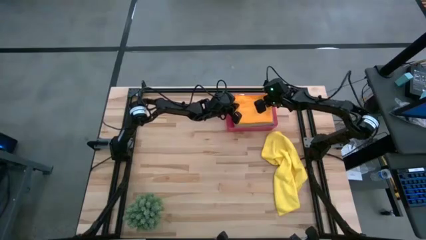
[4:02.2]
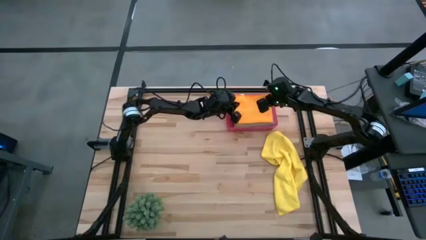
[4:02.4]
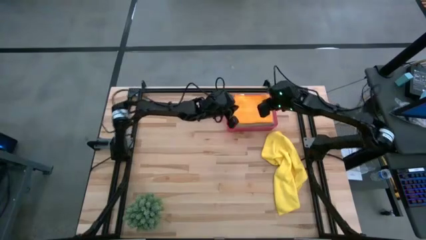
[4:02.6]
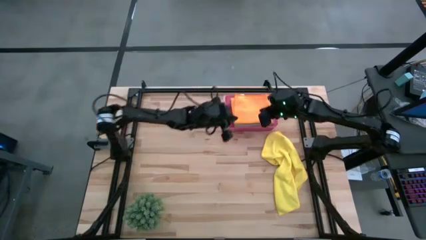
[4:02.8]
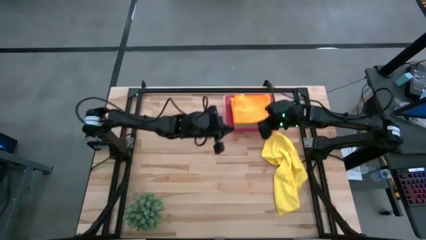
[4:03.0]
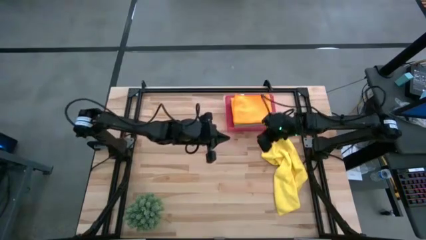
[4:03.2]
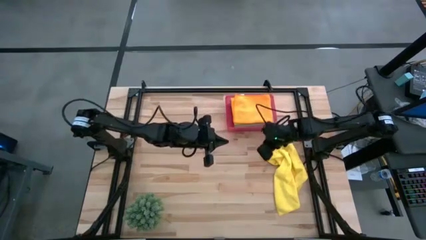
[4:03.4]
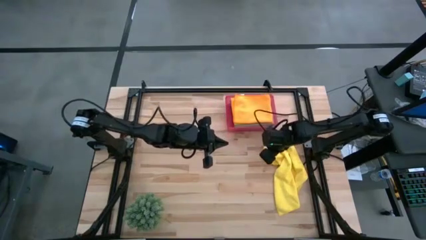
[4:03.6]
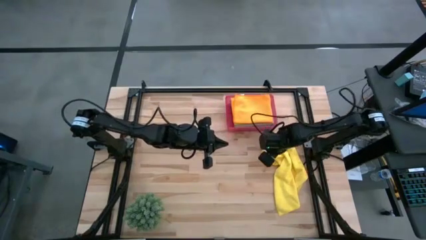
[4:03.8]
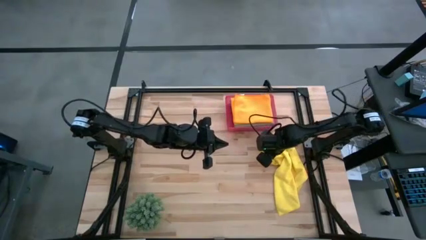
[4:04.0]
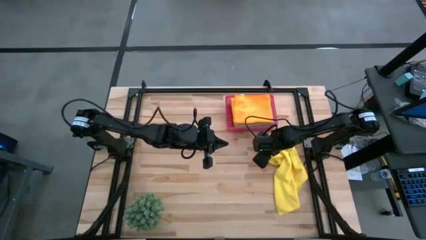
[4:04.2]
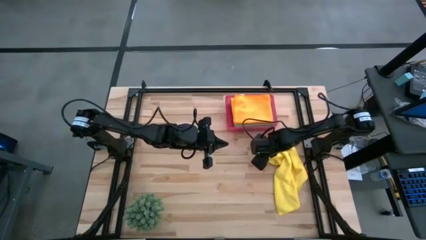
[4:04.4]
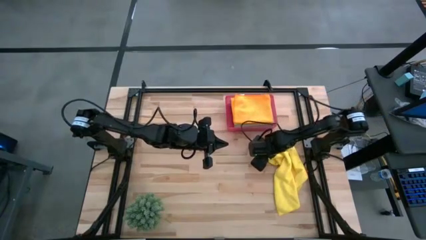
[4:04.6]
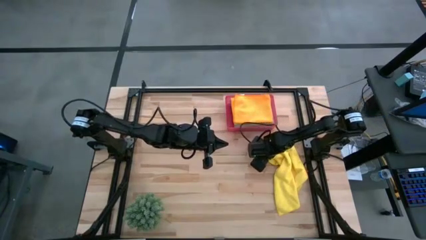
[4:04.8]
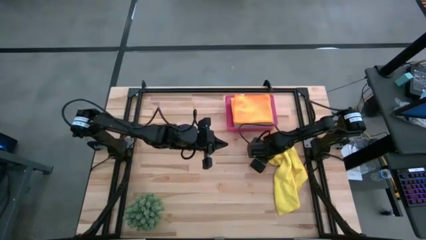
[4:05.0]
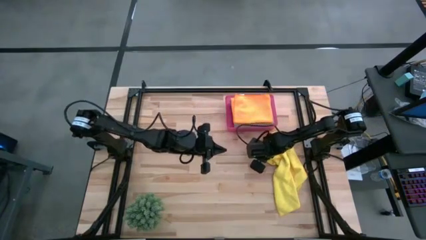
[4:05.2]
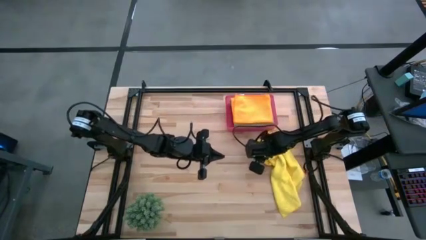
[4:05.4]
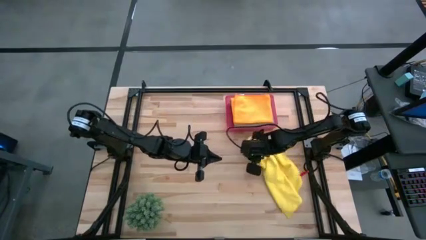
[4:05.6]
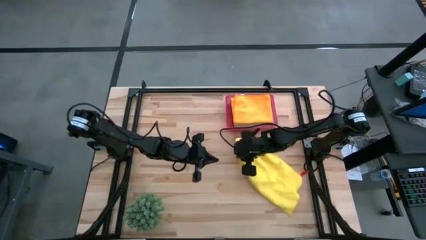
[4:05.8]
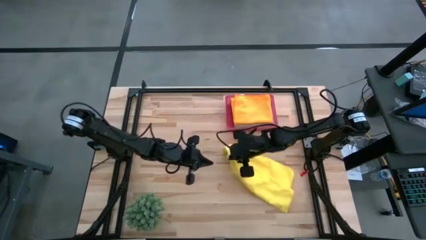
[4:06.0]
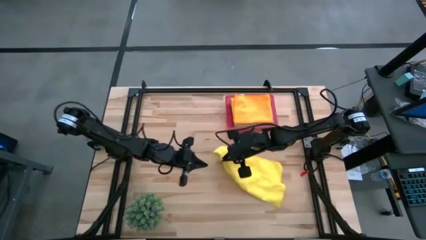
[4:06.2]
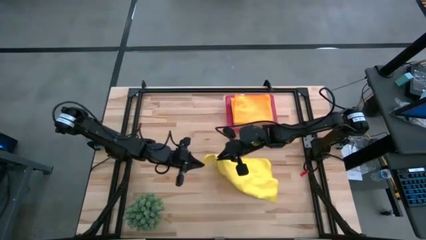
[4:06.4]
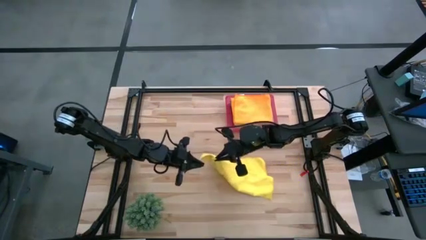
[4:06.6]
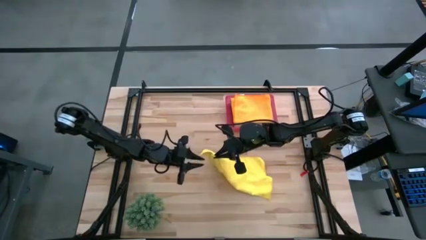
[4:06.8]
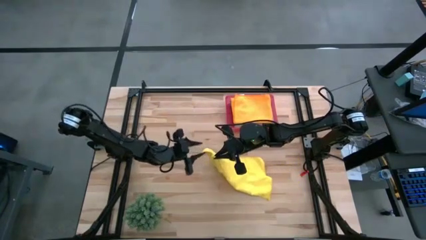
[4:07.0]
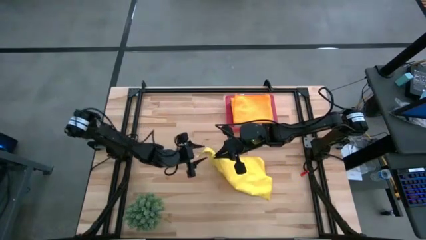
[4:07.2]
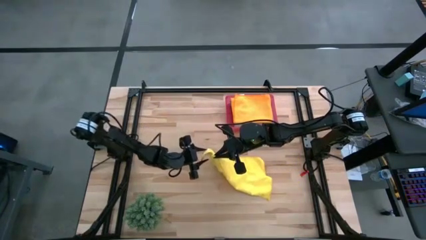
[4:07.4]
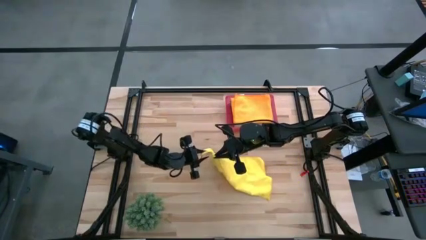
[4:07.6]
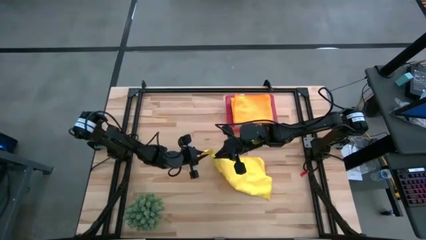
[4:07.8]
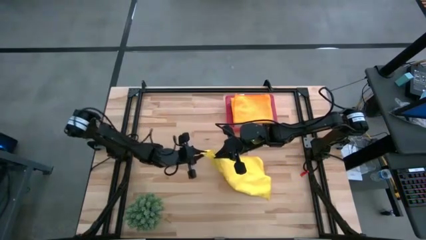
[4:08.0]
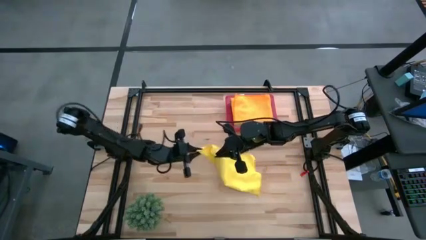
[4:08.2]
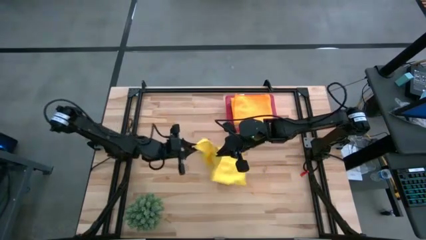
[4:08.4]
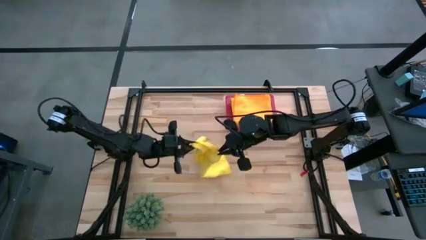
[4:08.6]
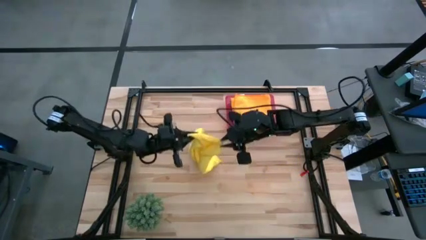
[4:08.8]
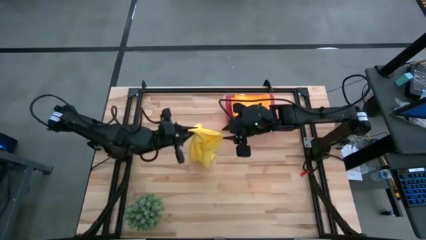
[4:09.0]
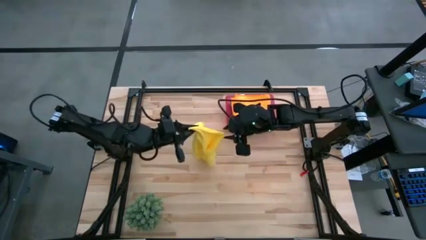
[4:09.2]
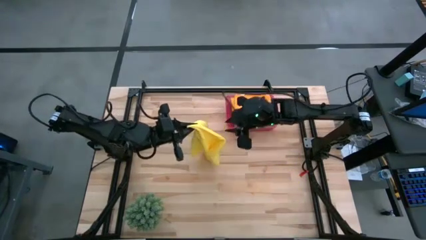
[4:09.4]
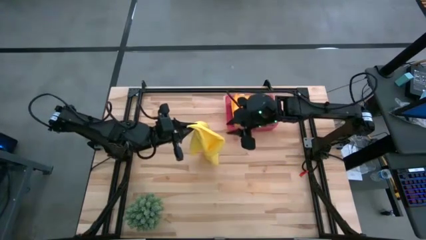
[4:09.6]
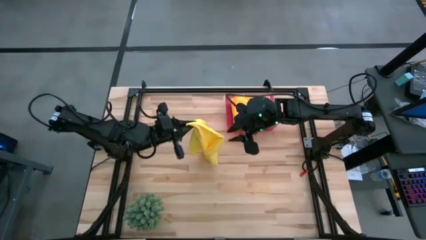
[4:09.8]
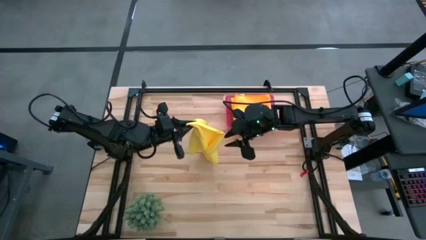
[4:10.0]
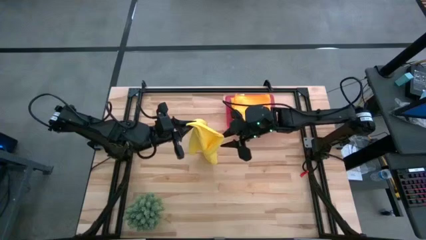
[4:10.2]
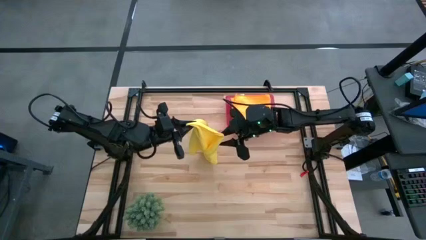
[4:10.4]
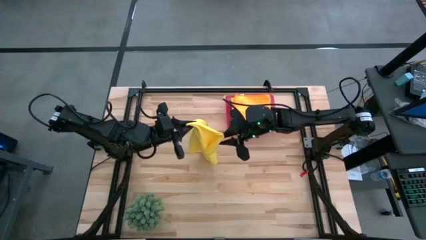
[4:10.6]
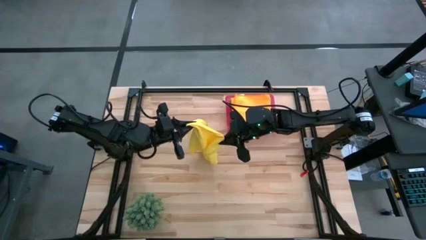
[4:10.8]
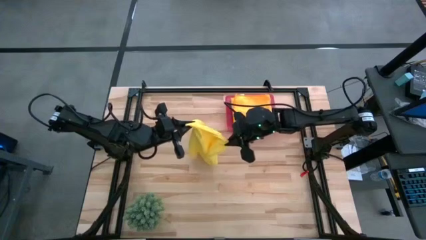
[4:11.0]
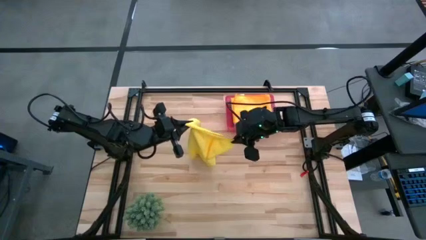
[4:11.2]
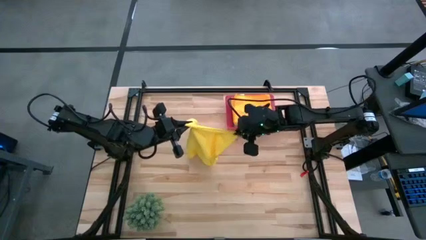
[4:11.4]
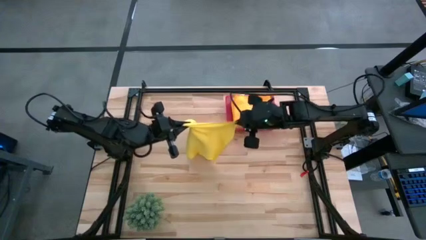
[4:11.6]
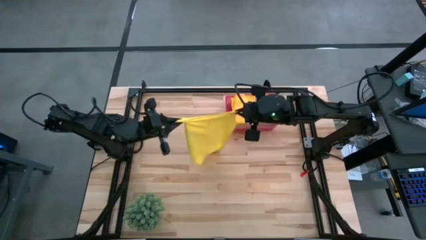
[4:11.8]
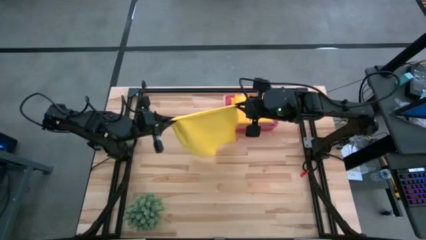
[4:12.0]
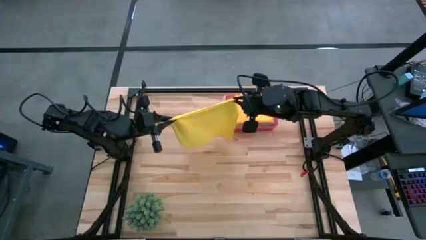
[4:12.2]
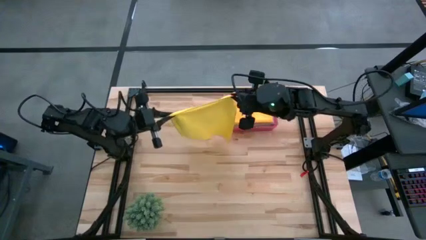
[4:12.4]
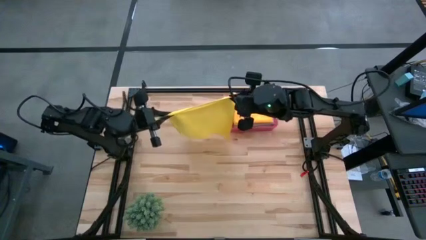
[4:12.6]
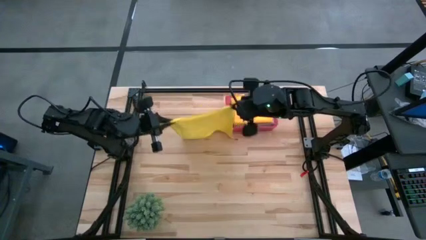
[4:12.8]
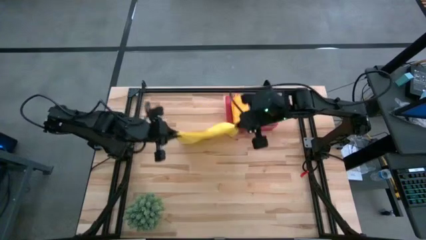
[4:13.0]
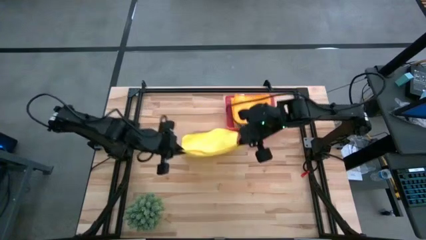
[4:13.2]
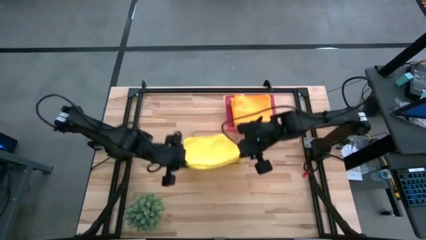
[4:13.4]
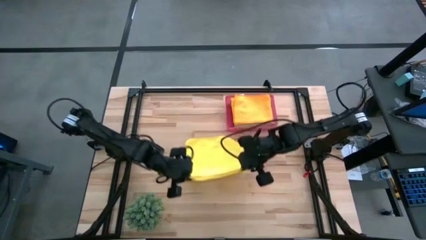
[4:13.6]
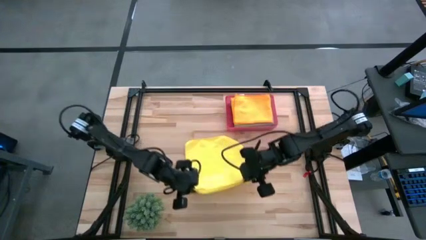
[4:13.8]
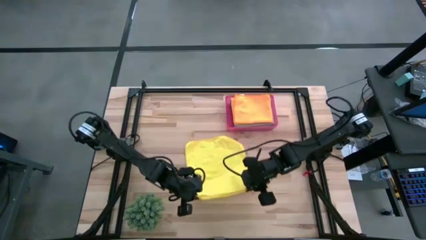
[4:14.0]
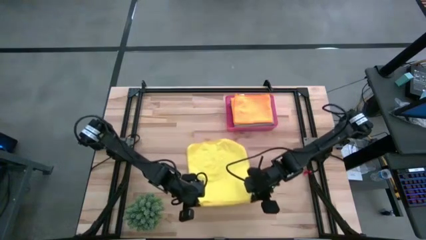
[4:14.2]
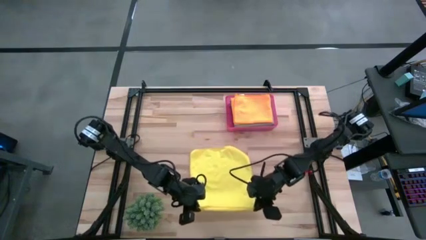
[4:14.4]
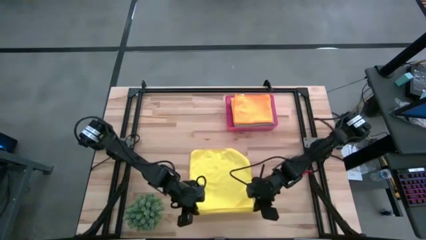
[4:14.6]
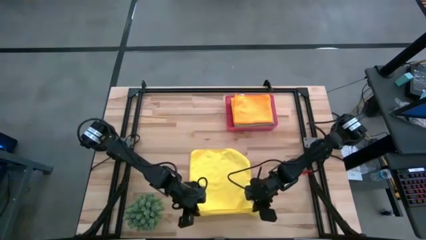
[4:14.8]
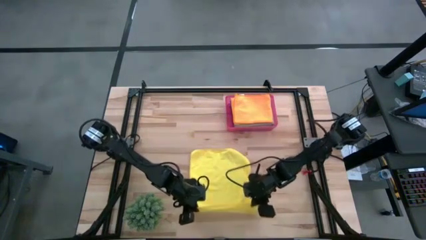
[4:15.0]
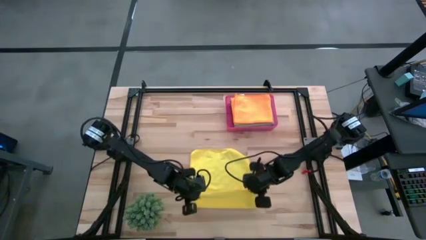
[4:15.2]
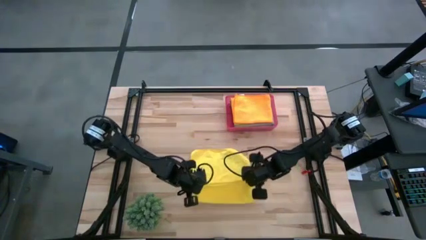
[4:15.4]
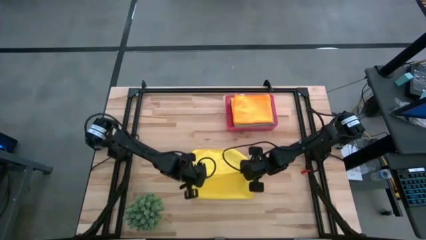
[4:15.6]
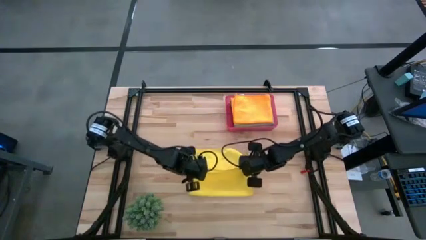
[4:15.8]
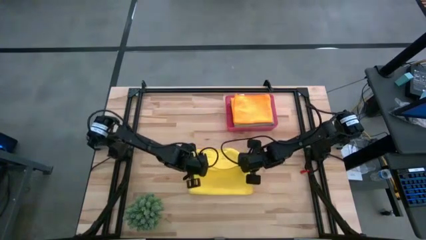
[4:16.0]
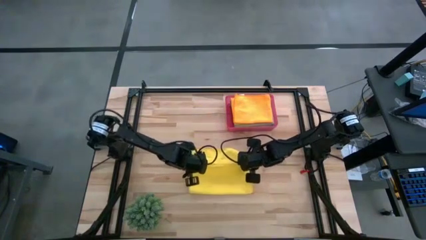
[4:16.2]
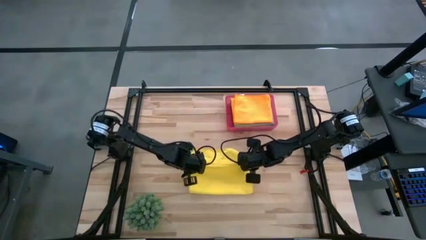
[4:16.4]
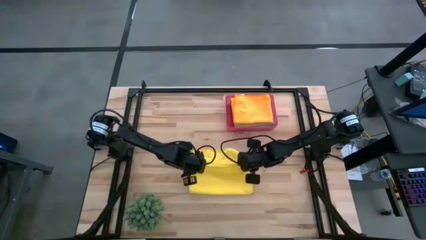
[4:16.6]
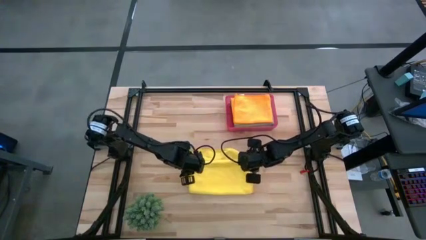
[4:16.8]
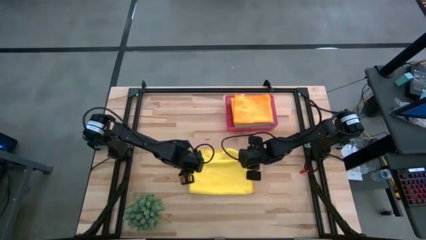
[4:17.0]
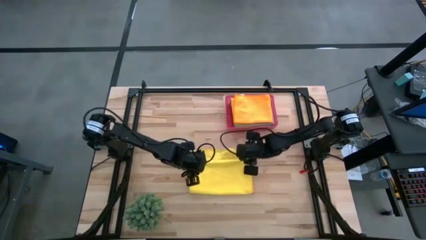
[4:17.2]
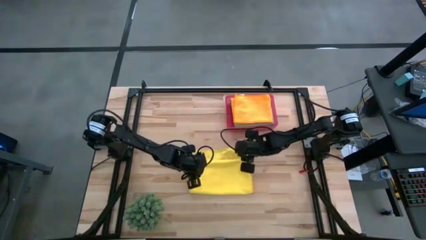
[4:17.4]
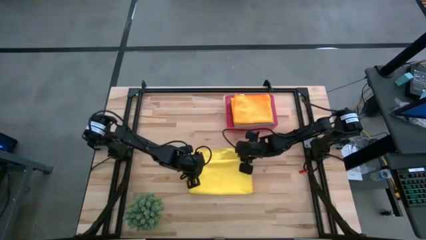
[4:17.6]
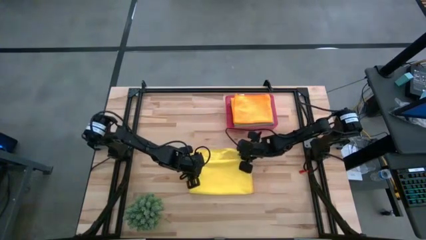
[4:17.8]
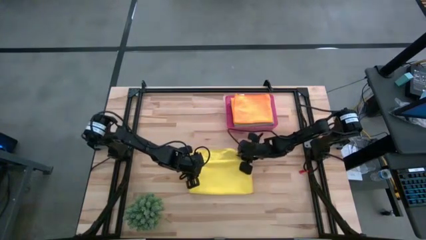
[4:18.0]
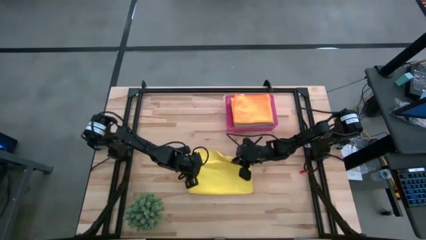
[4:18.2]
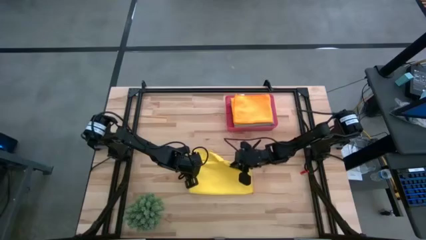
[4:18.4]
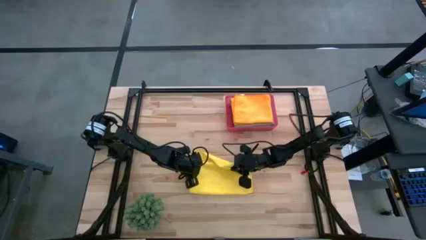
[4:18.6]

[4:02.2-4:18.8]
Task: Fold microfiber towels
Fold the yellow microfiber cloth
